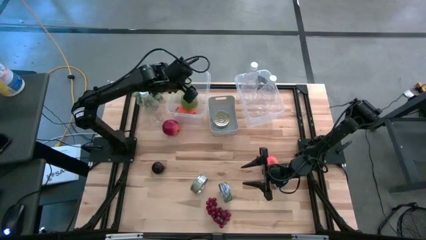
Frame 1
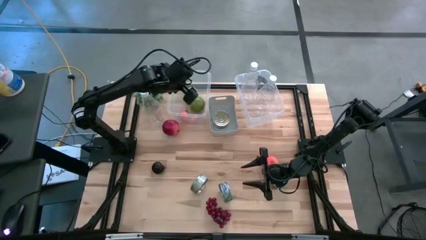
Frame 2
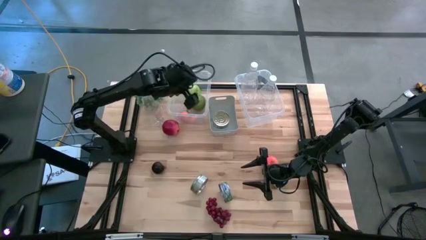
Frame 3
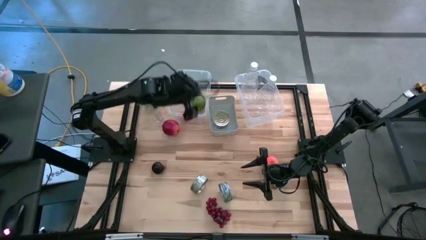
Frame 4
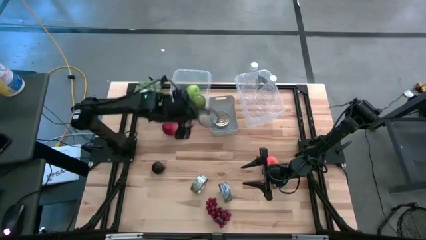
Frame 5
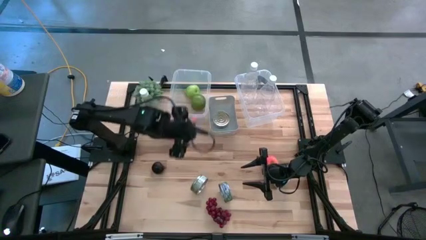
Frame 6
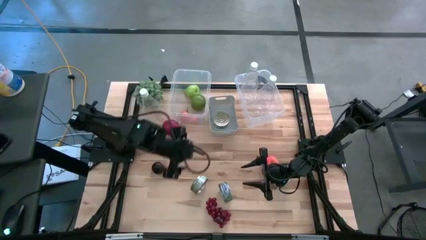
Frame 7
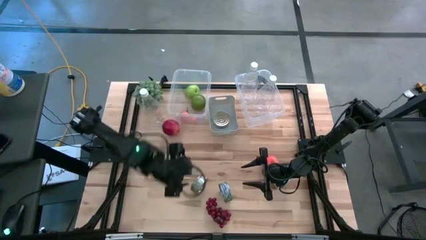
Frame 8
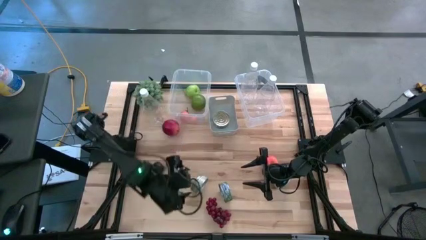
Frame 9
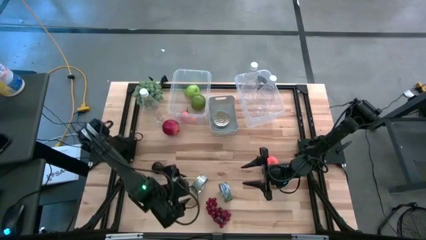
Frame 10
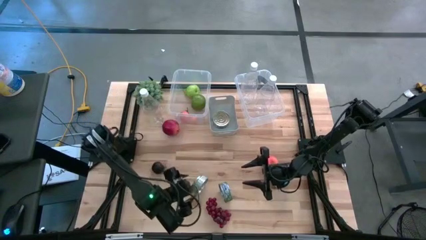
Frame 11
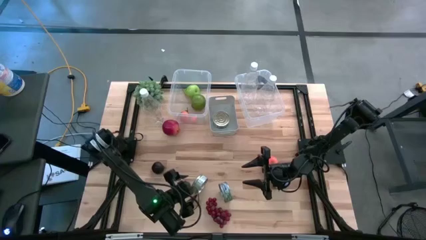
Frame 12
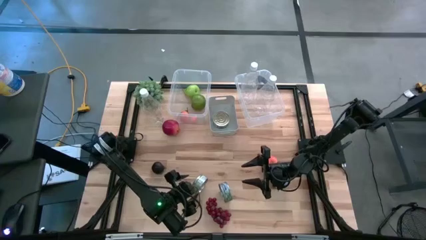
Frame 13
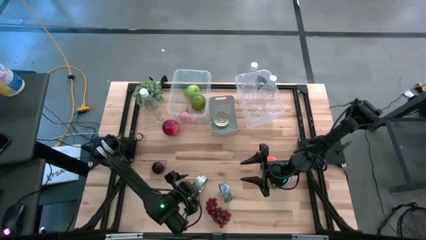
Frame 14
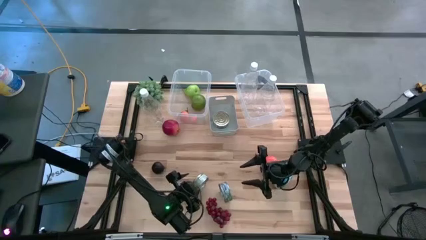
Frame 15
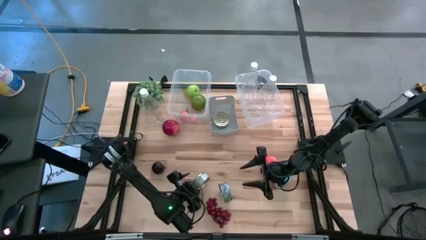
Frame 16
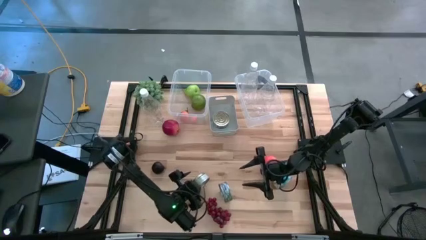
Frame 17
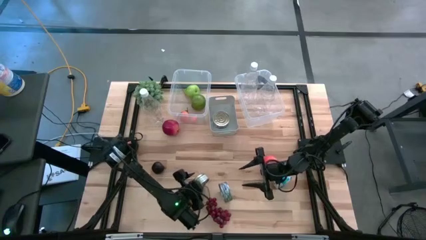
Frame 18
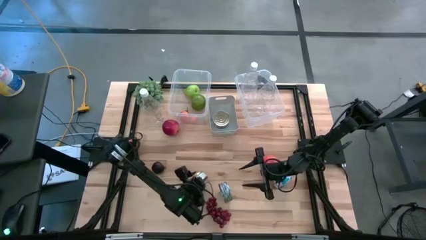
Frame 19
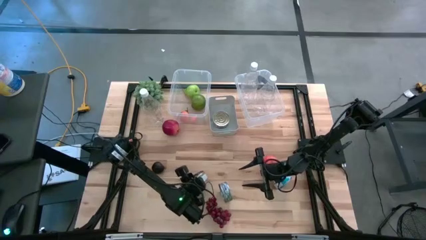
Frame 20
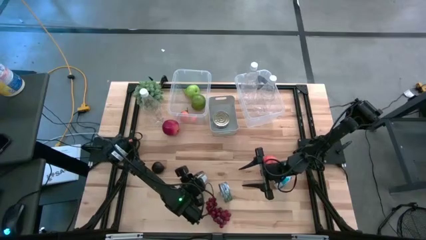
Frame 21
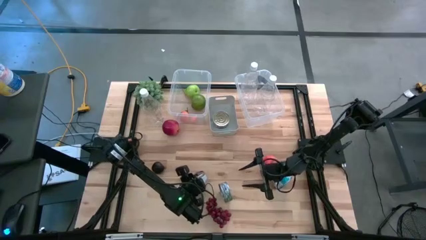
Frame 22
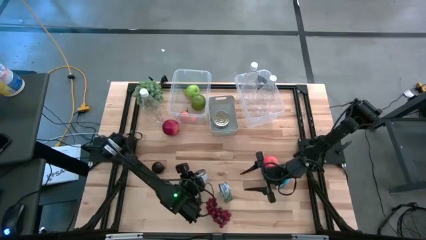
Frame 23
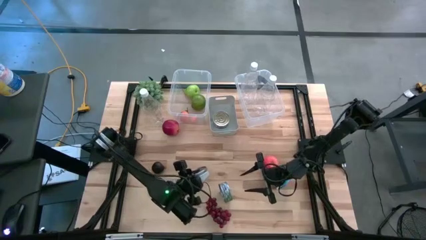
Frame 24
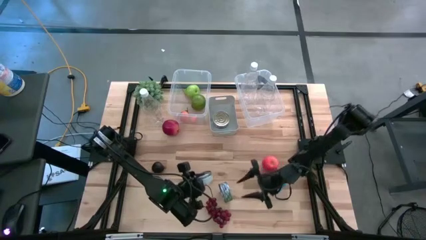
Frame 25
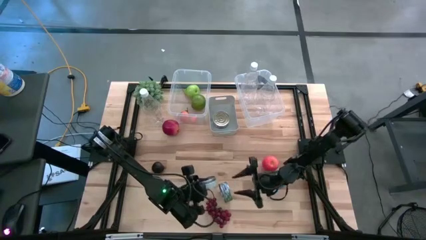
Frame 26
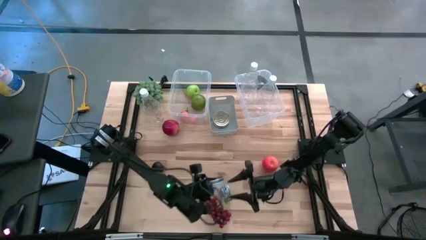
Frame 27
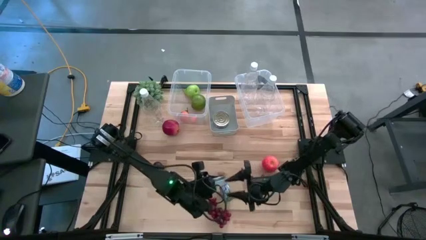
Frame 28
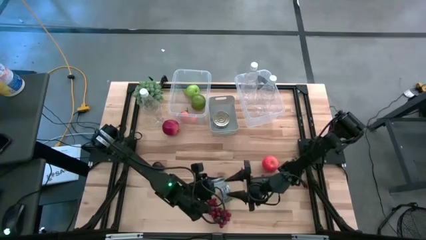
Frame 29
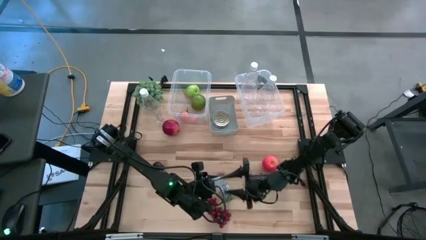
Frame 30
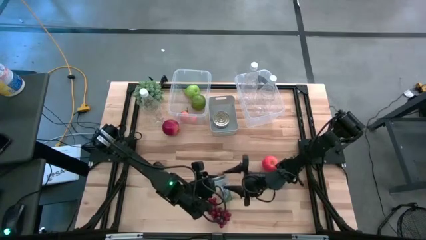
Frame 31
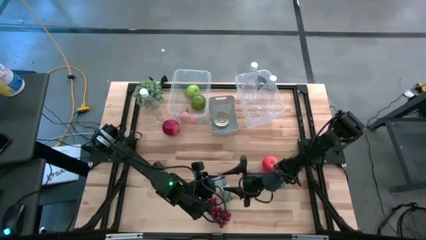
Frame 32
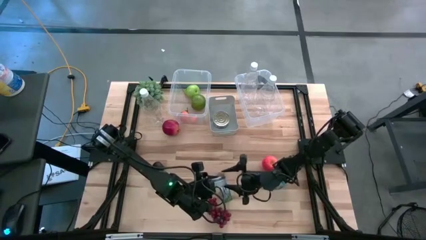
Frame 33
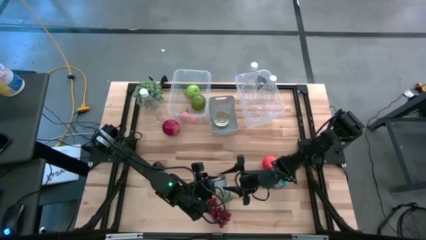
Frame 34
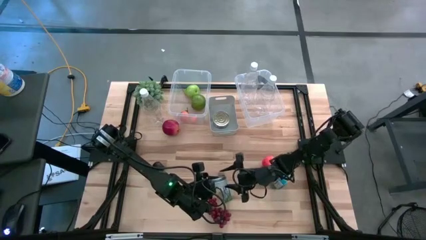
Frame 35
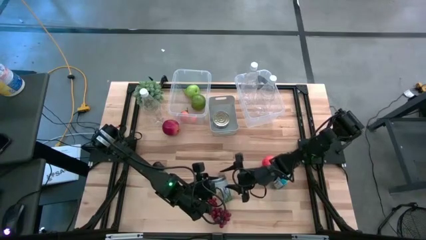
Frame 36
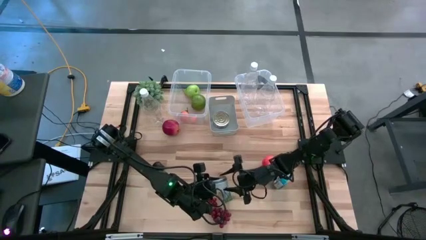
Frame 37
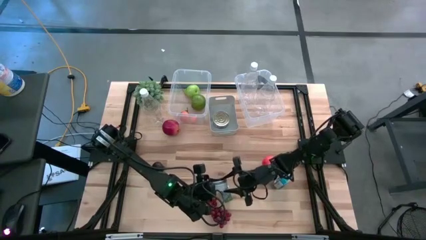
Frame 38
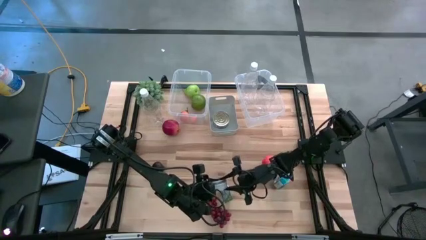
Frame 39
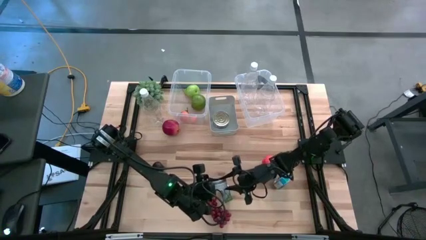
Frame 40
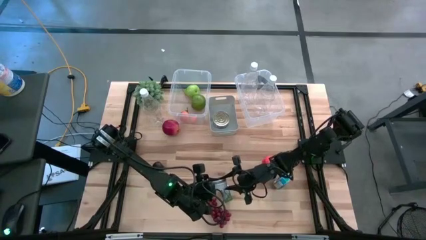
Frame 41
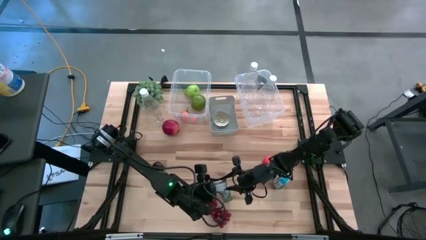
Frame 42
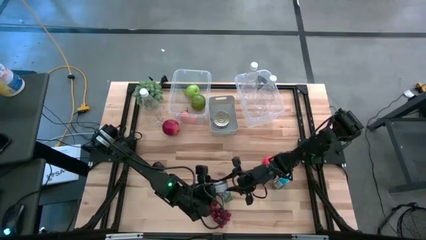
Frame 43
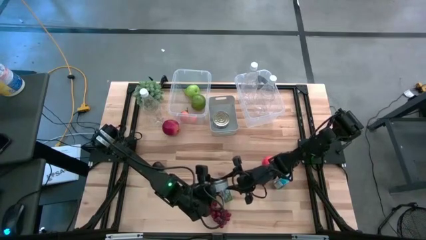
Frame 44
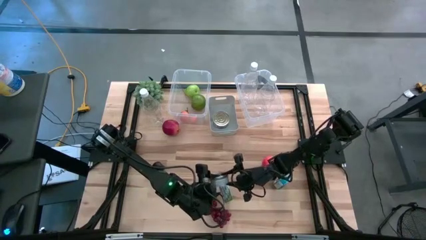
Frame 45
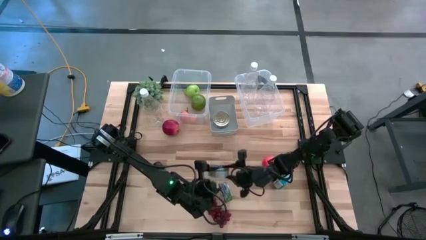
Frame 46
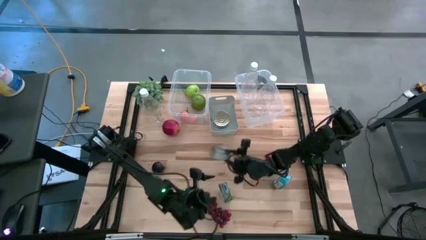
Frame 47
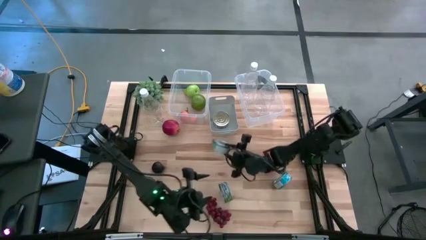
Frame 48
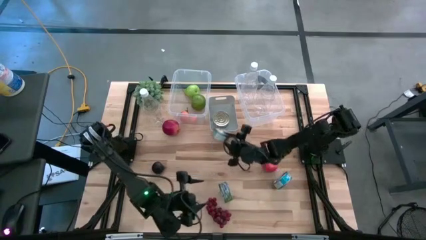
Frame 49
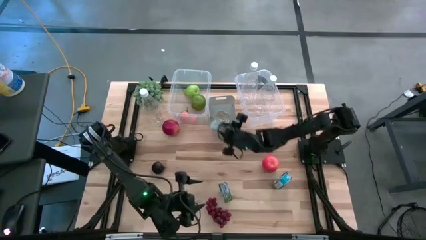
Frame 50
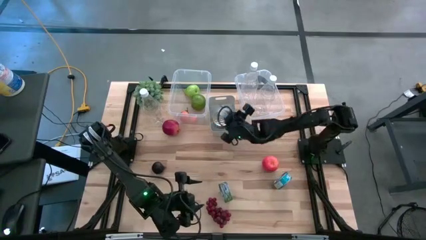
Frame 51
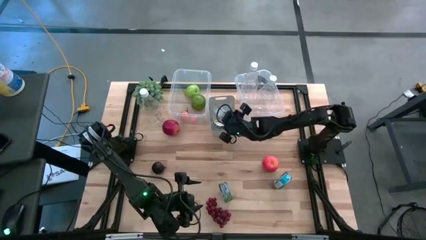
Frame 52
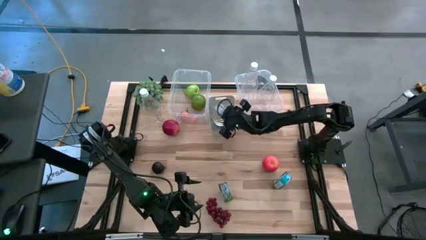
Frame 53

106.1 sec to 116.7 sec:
Task: Pick & Place Food Item
Put the left green tuna can into the gray bin
